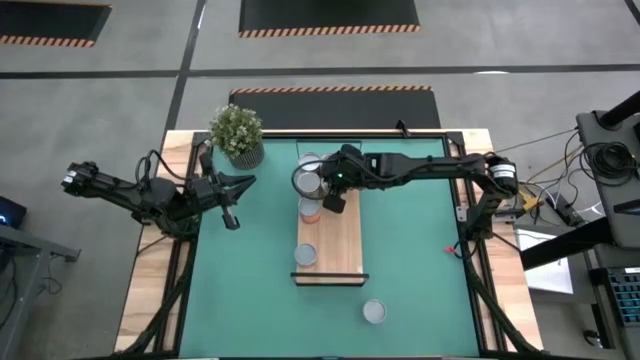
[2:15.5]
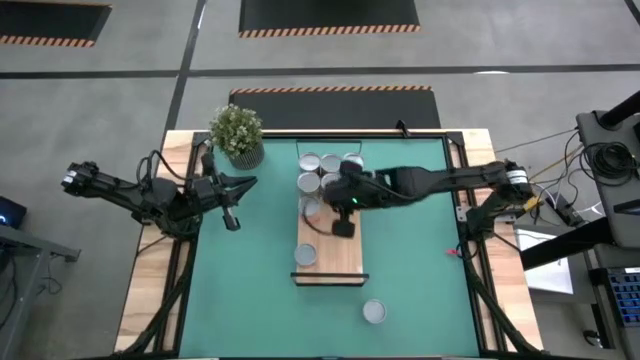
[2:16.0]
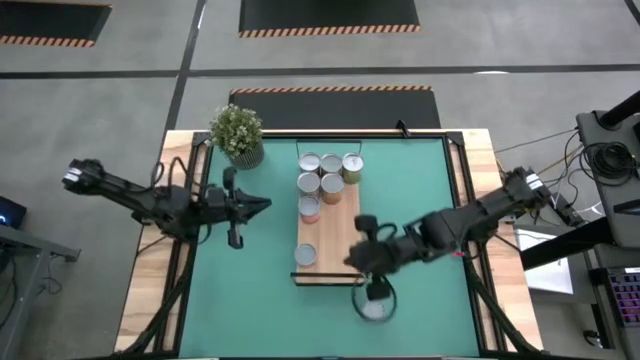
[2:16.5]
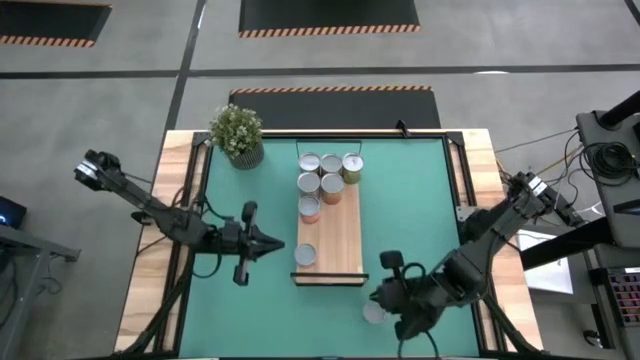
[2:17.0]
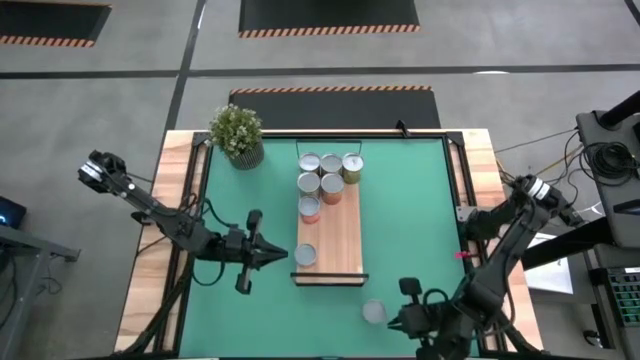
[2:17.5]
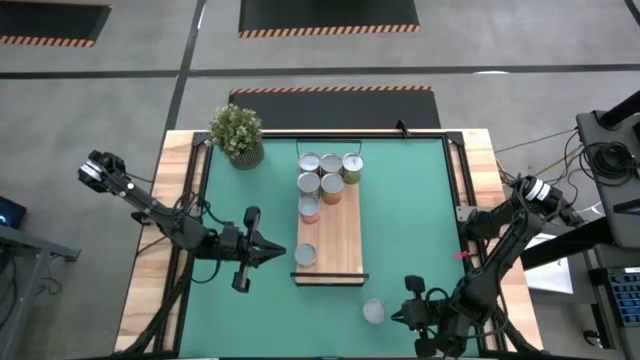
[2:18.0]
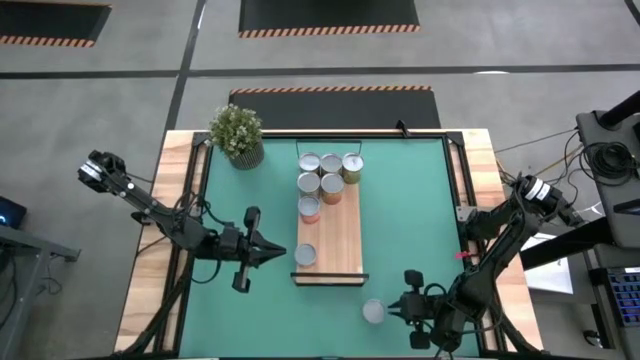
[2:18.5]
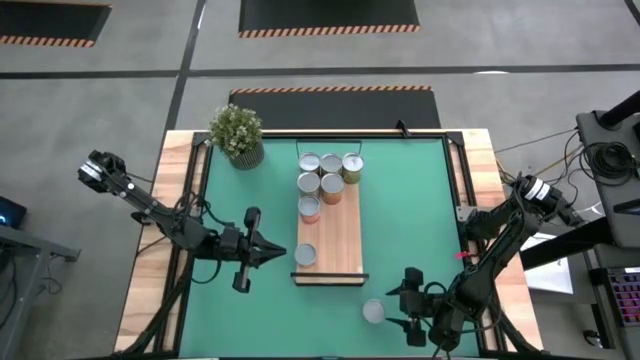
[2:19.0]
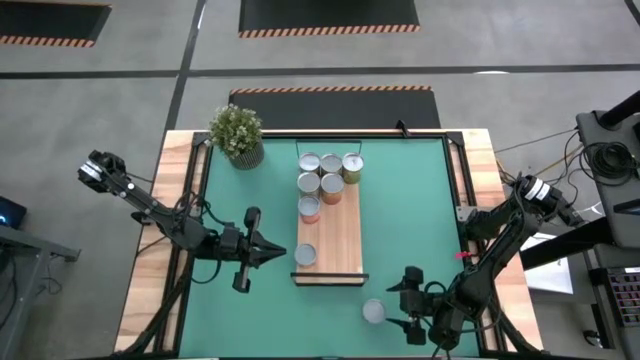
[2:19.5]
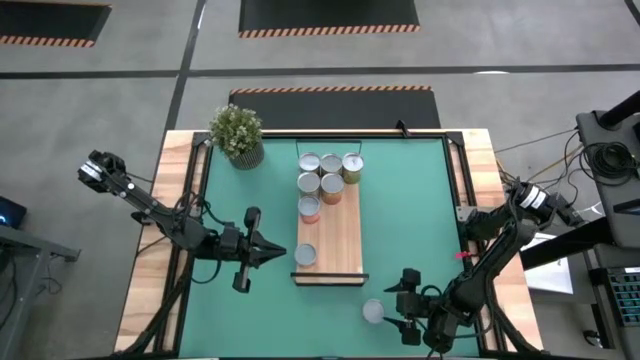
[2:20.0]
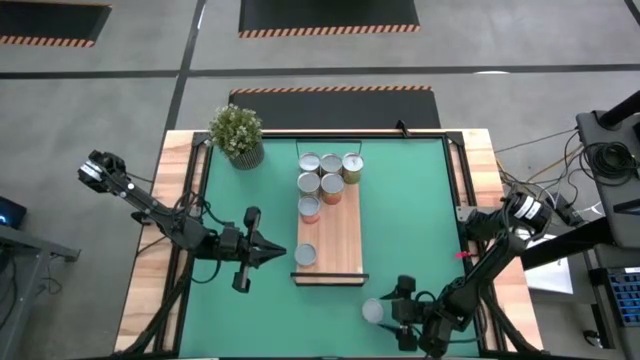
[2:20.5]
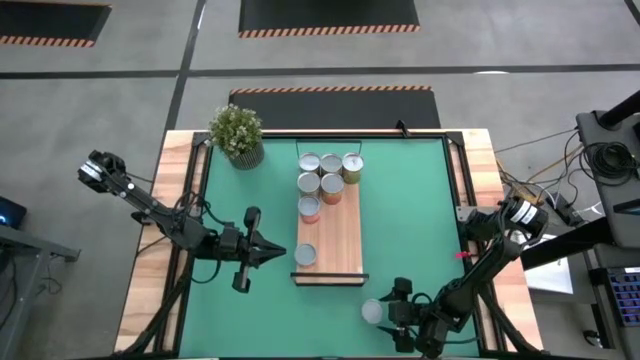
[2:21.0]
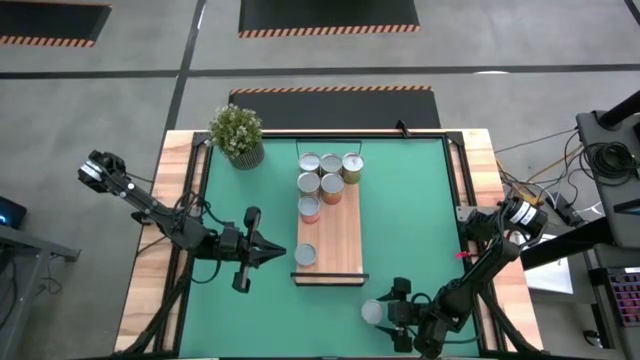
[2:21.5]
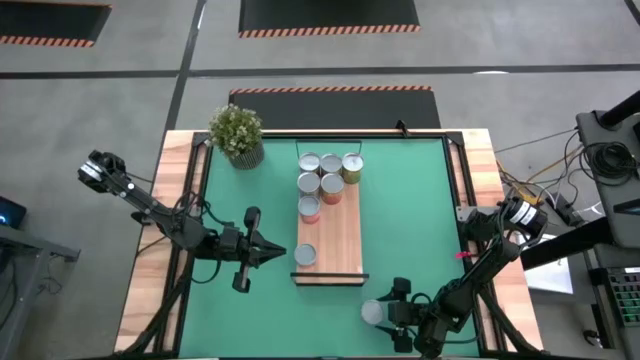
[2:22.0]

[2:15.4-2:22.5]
Task: Pick and place cans onto a shelf
Put the canned carrots on the shelf

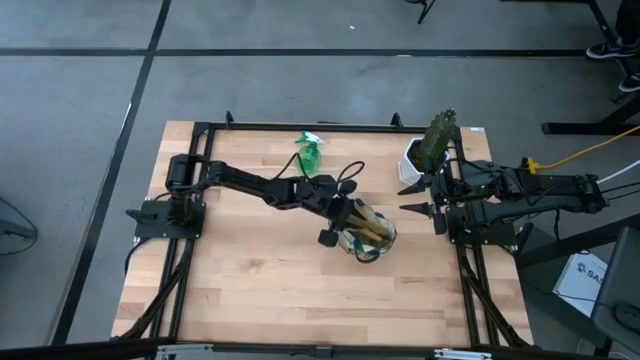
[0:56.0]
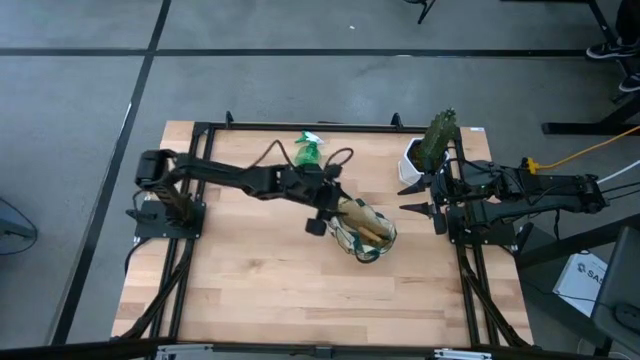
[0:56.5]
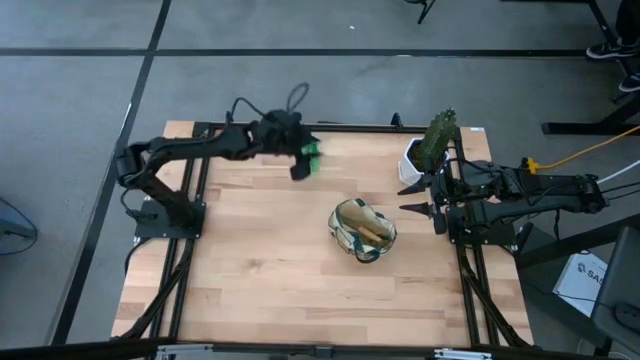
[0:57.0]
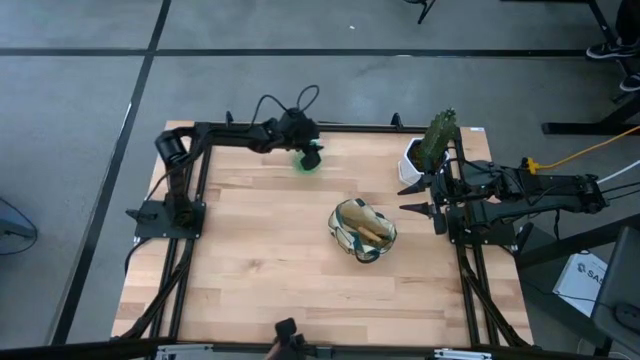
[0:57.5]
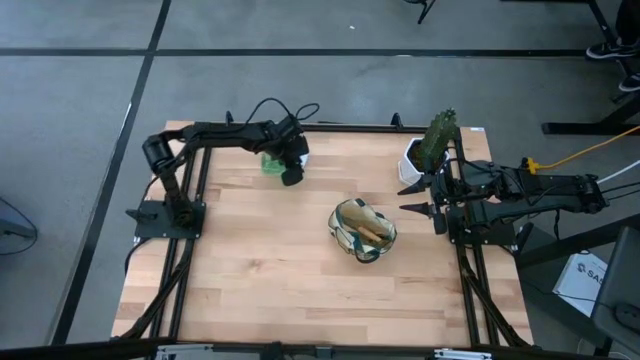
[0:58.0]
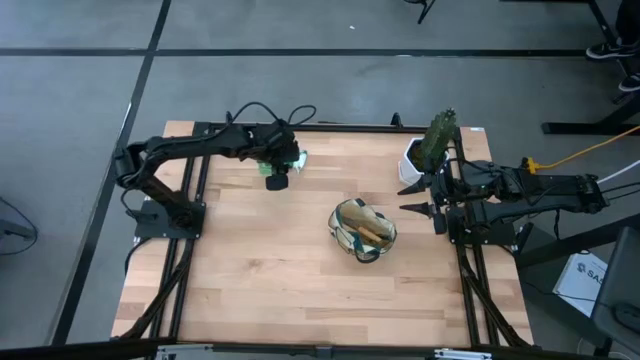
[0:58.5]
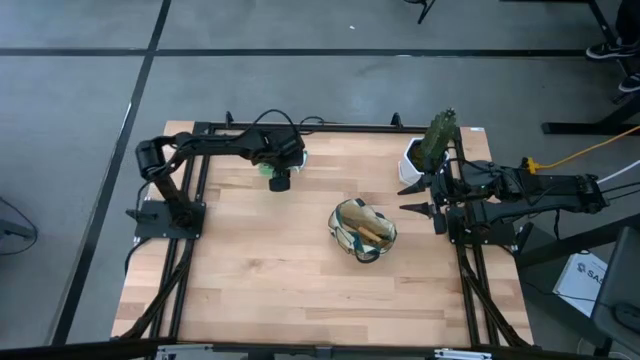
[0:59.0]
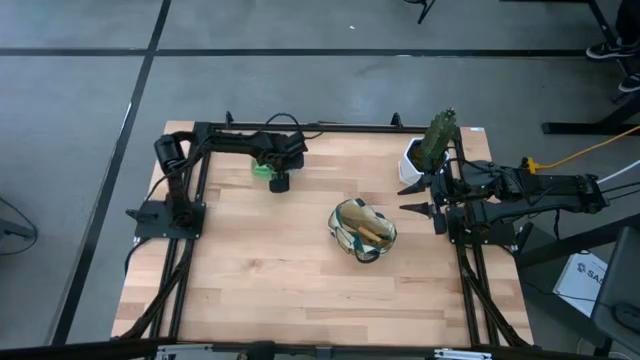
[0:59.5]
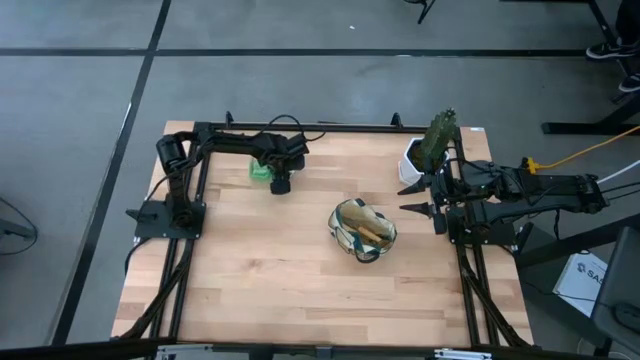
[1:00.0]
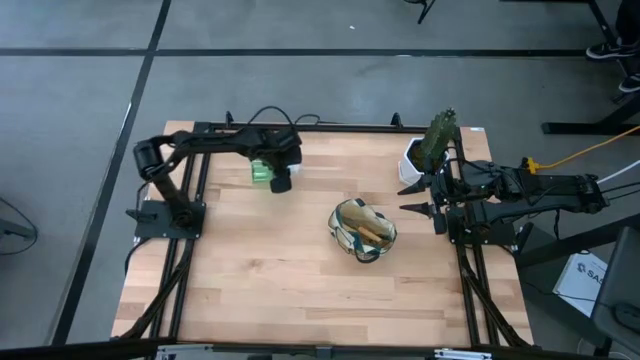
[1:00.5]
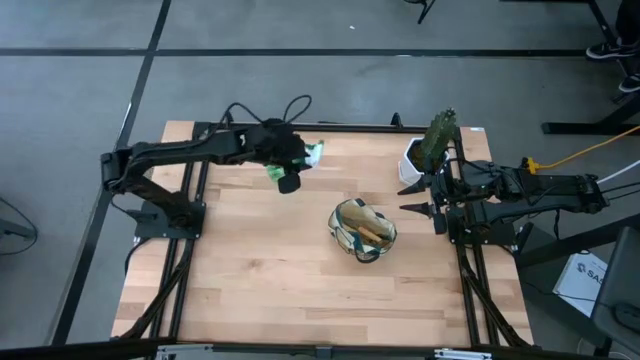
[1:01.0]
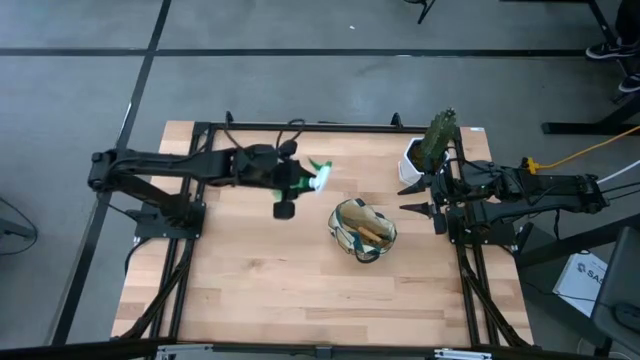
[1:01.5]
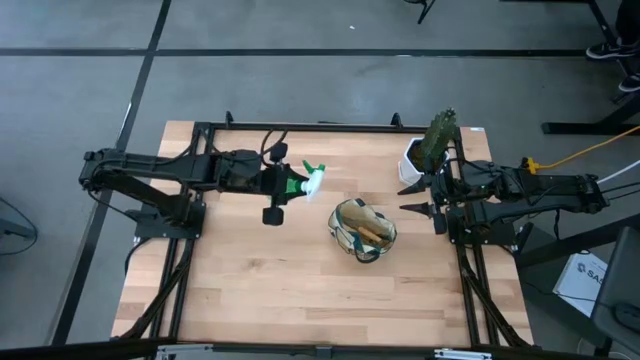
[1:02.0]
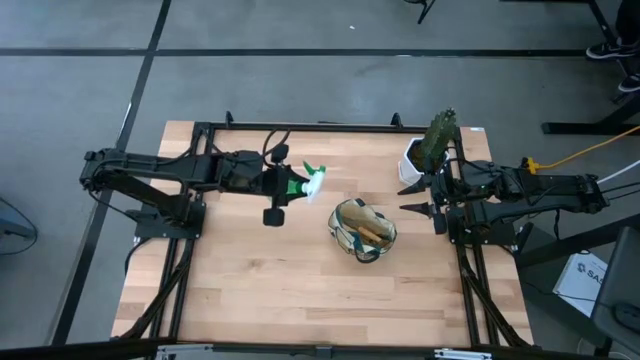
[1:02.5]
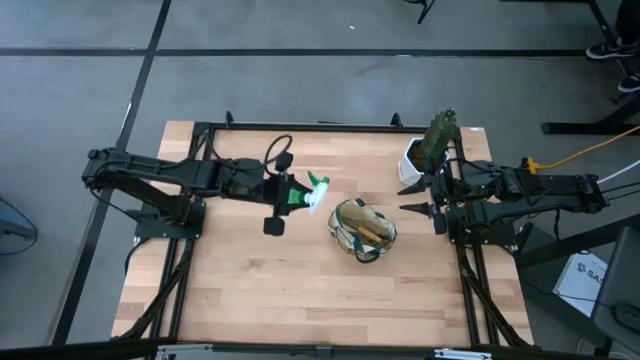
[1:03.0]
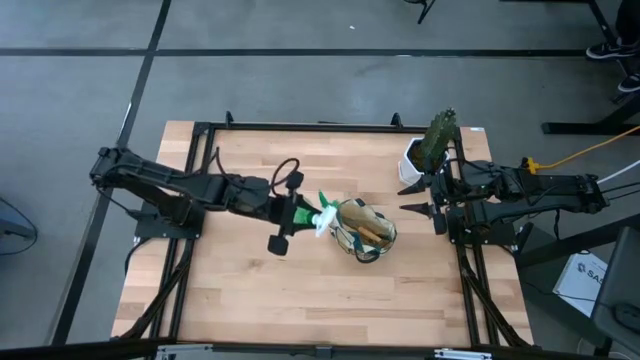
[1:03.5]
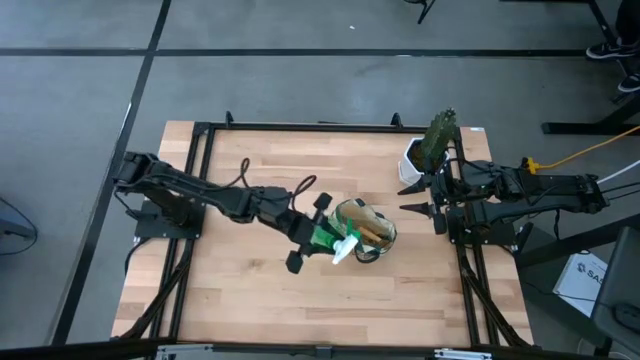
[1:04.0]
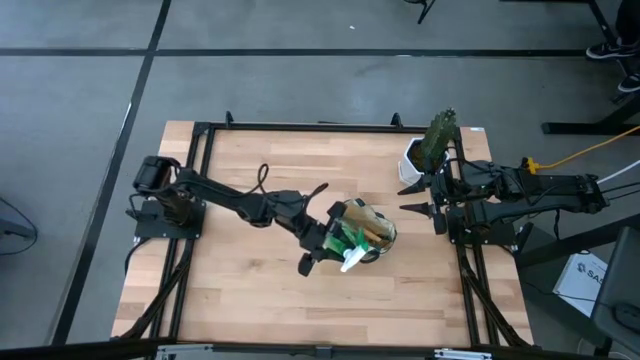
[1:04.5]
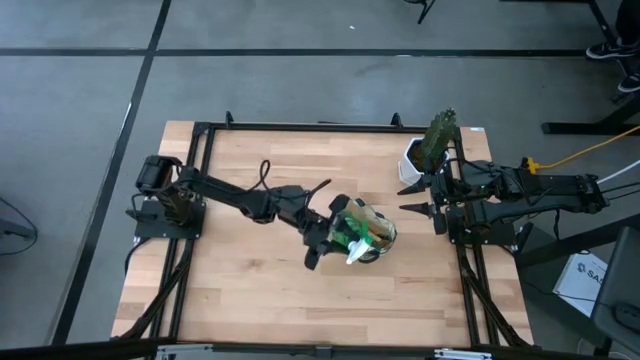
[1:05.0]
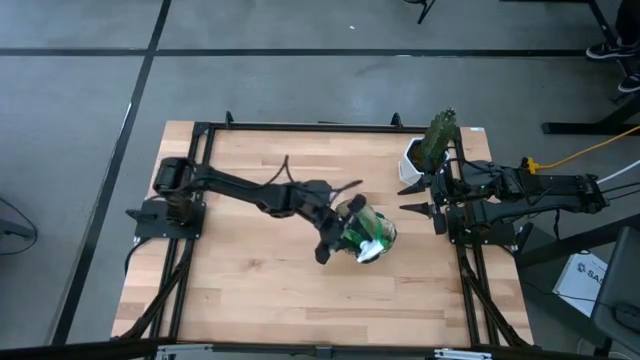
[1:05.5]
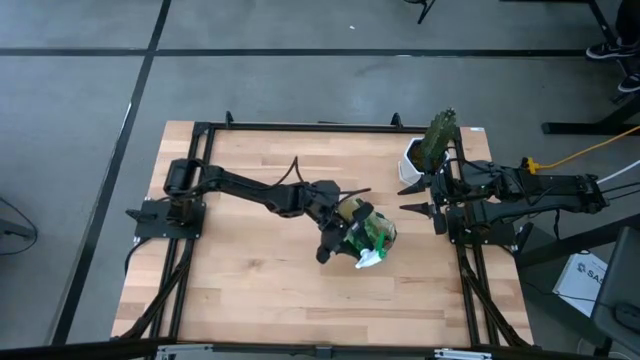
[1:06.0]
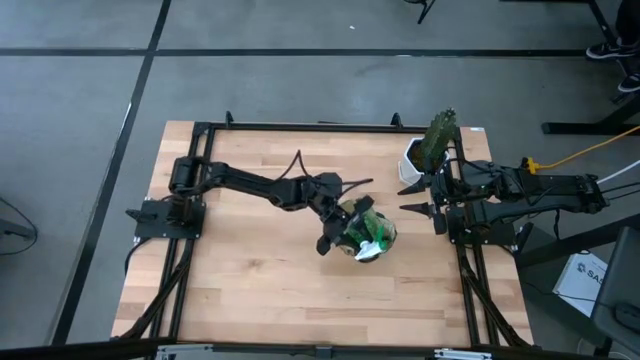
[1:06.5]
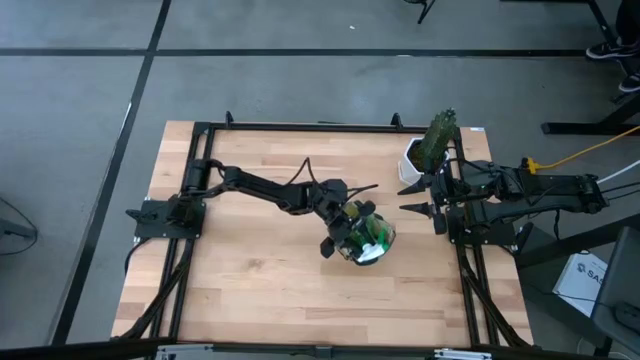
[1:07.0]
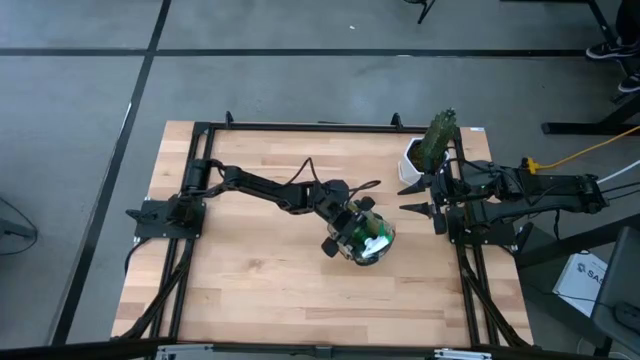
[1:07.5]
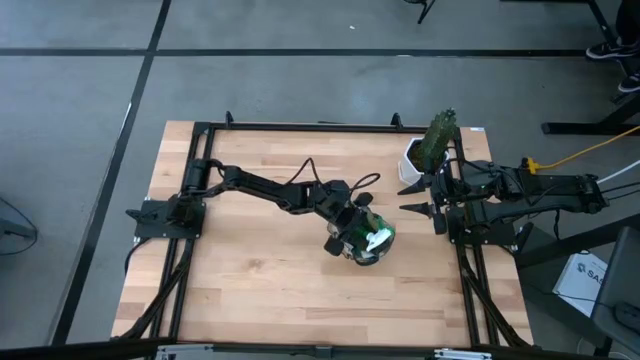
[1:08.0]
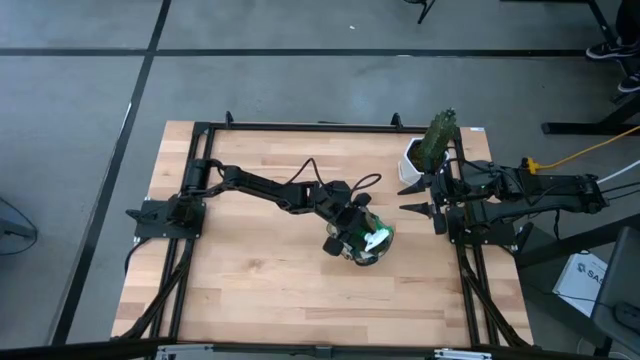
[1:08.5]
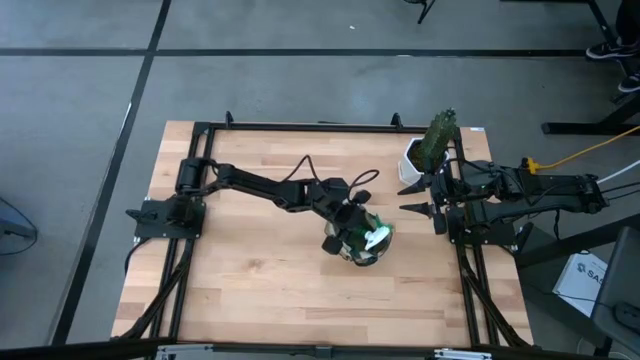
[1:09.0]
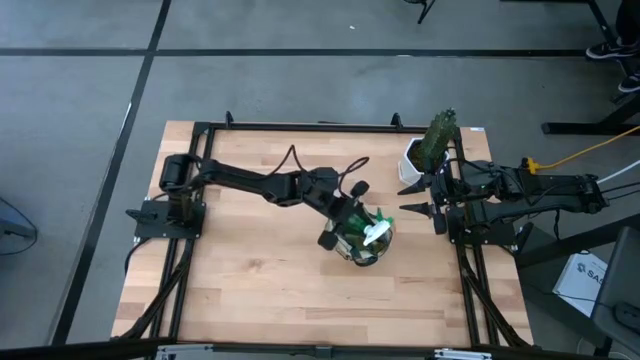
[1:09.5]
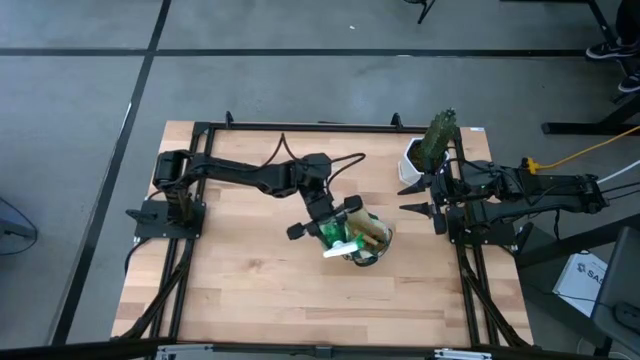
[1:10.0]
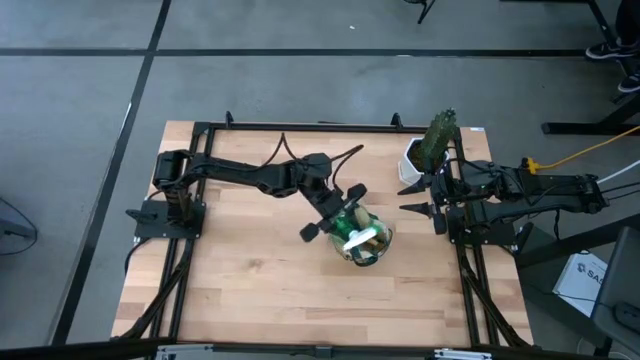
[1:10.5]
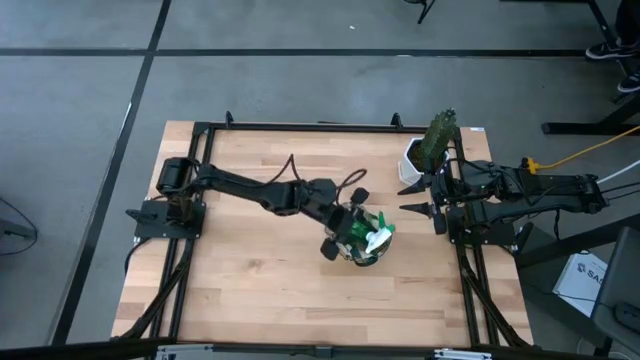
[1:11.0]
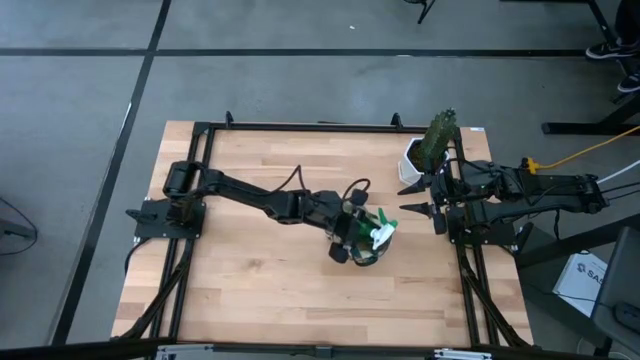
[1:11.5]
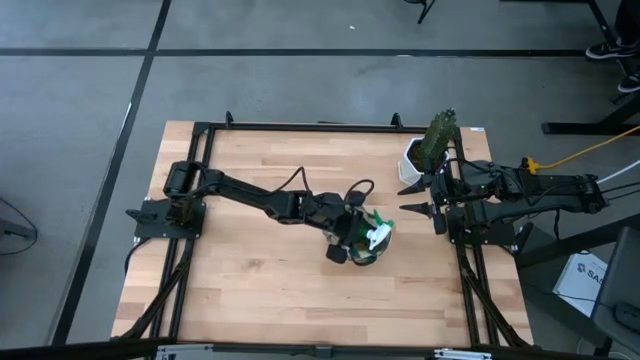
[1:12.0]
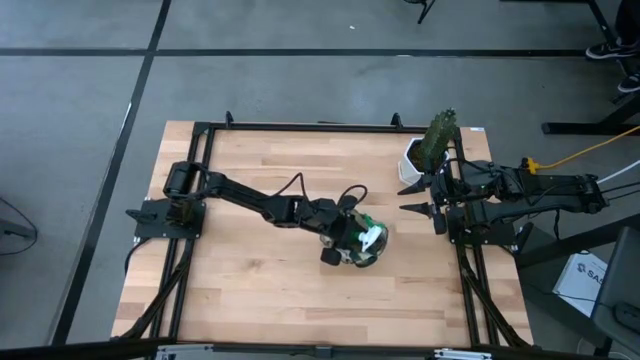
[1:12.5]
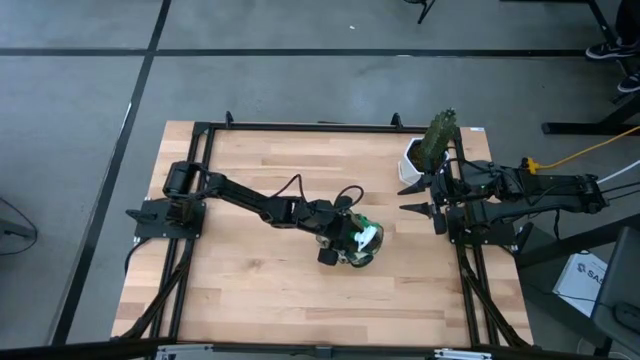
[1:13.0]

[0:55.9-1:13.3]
Task: Pick & Place Garden tools in Gardening bag
Put the green spray bottle into the light brown gardening bag
